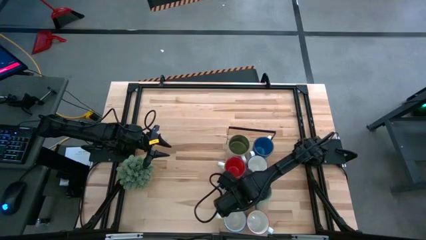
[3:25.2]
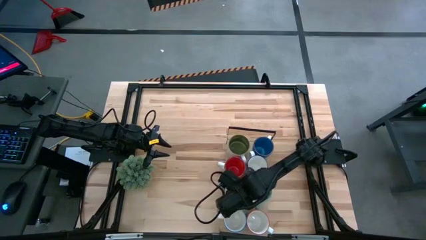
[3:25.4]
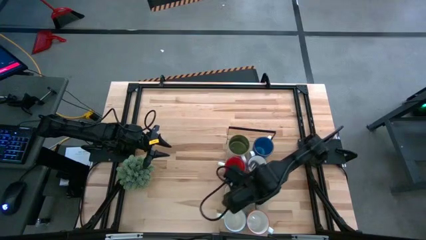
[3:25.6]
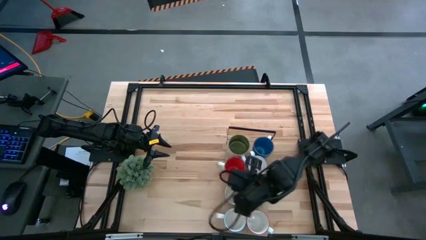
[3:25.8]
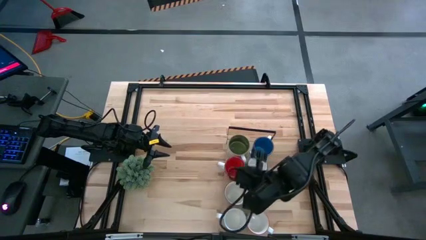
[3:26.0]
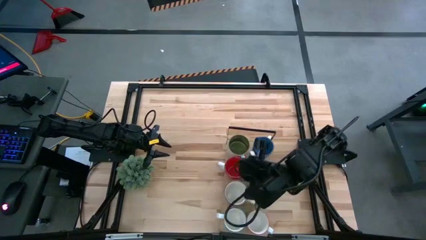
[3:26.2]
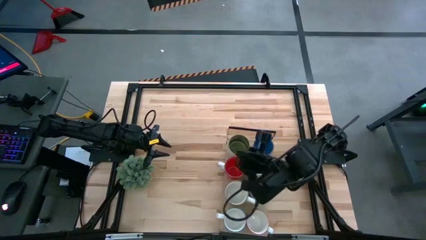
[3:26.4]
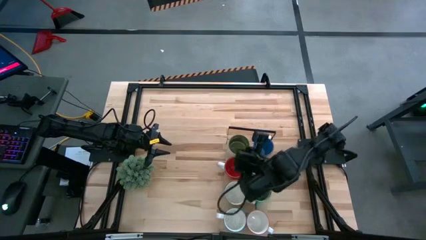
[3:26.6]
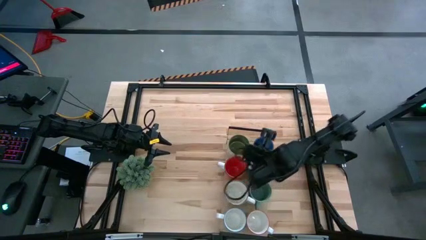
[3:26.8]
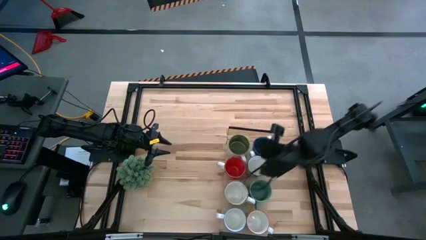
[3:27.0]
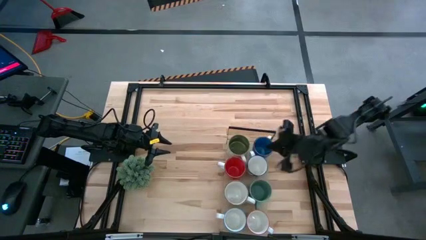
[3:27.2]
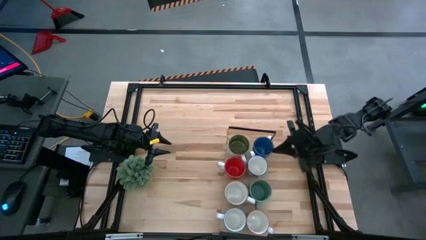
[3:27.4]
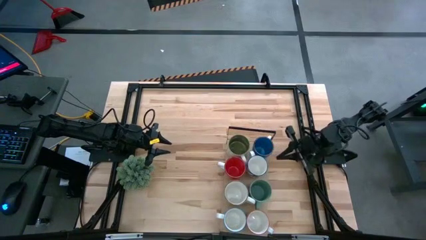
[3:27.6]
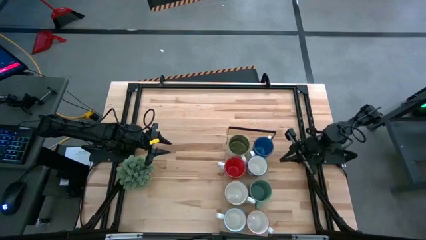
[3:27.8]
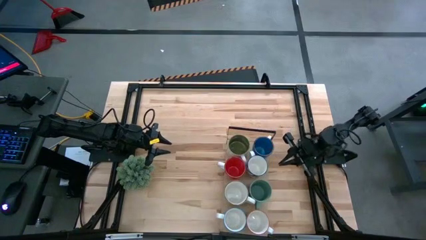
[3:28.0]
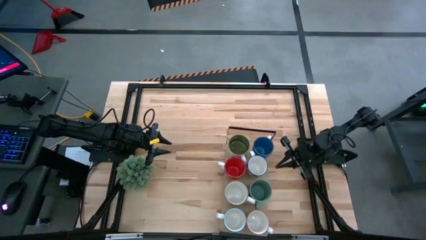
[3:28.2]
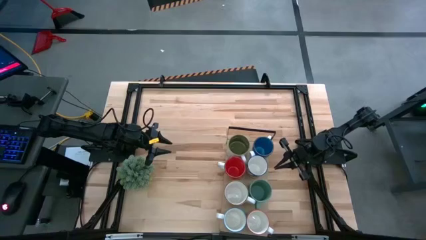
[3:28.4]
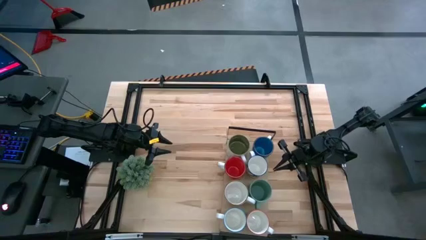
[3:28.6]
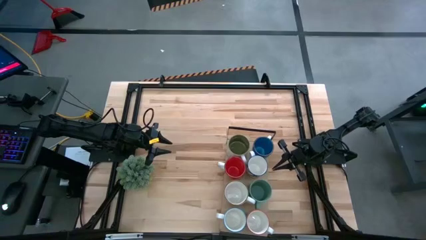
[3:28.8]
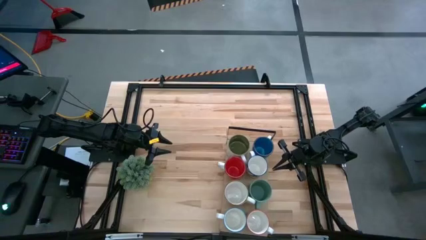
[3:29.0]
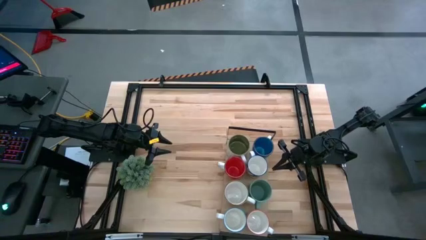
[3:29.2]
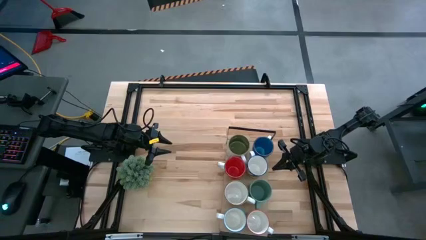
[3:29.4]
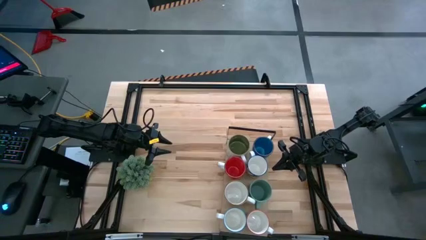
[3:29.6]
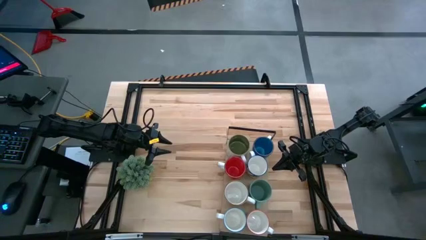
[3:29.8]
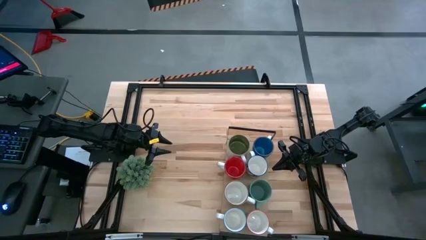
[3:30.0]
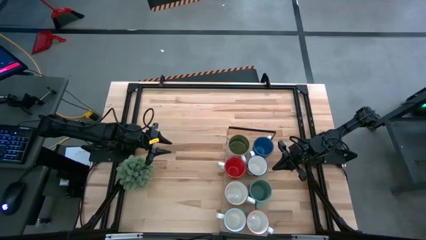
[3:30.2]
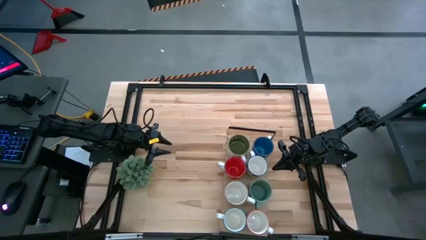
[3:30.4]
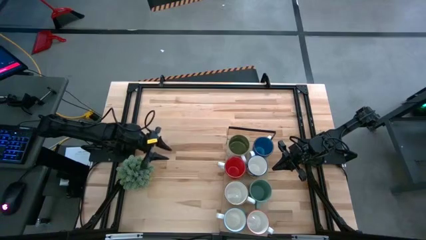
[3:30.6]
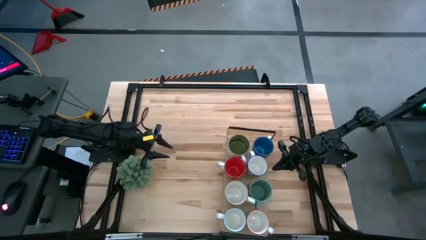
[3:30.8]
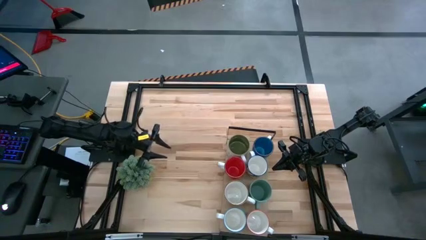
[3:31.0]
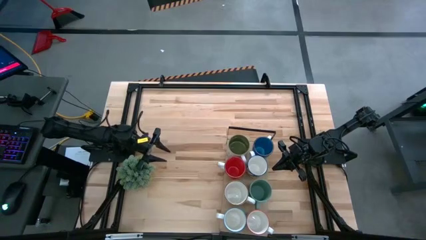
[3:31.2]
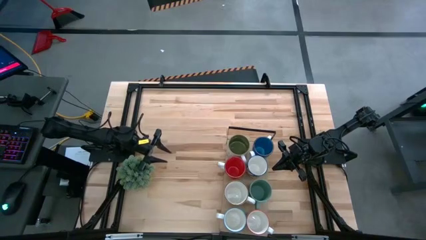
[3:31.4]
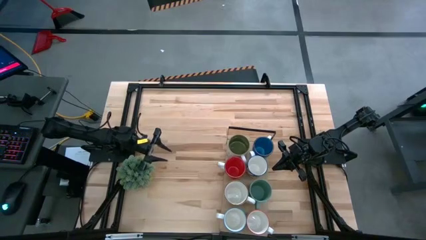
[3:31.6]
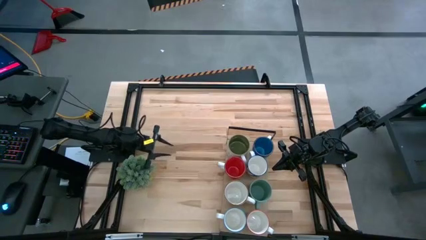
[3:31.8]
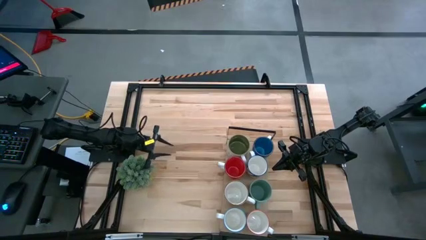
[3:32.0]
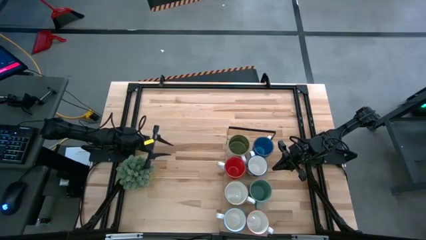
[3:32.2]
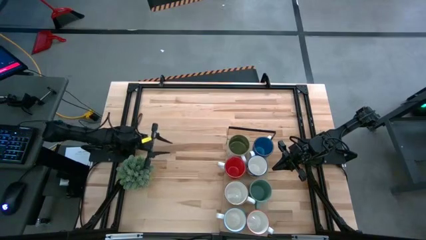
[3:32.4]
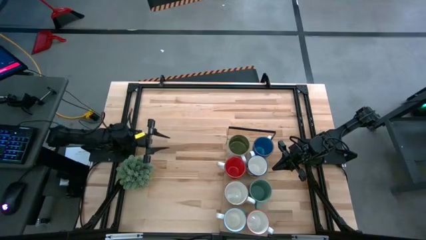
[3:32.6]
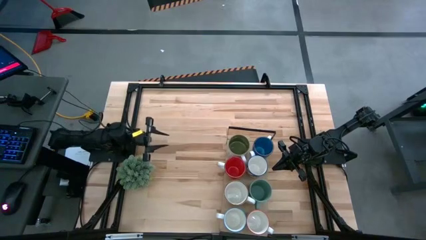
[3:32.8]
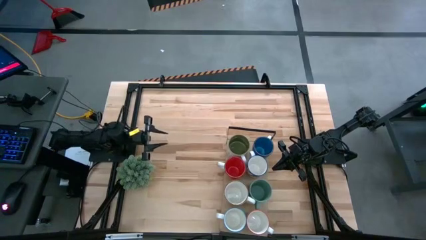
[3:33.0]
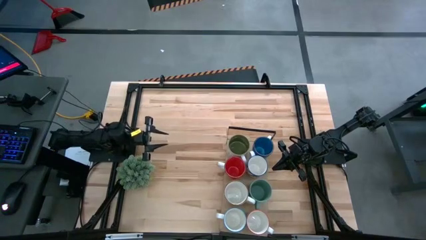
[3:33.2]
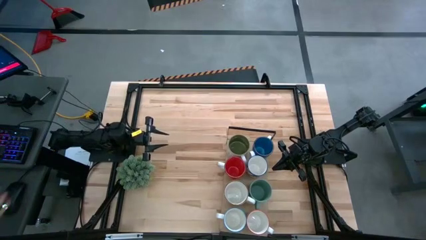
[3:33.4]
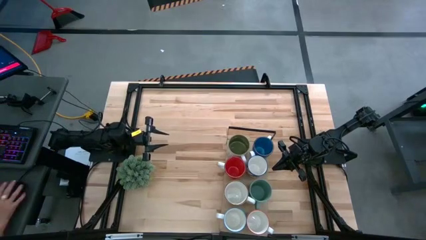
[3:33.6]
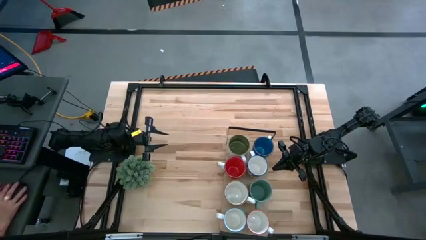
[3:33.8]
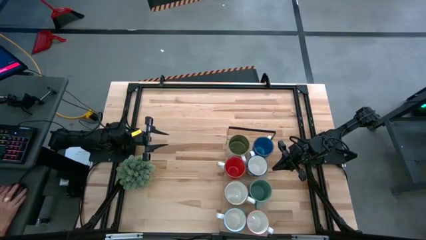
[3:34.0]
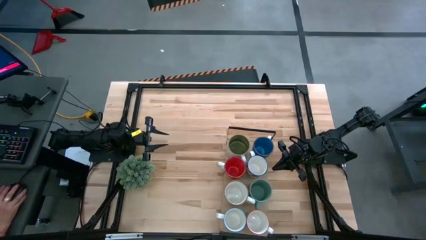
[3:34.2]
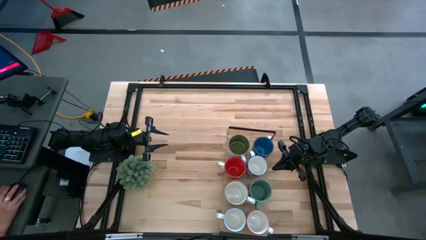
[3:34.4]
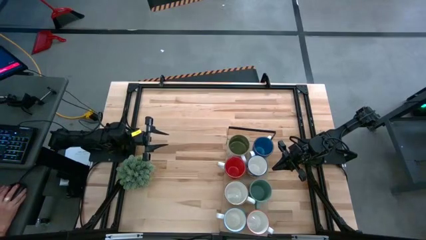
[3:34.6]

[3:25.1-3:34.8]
Task: Place coffee mugs
Return to Home Position
